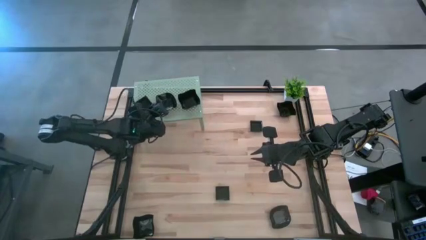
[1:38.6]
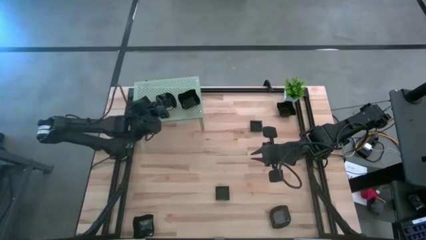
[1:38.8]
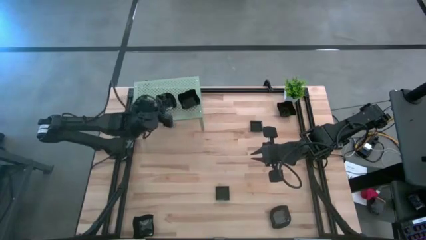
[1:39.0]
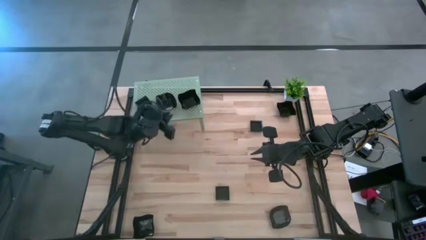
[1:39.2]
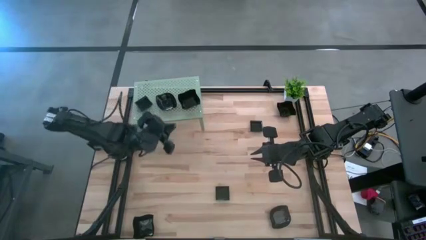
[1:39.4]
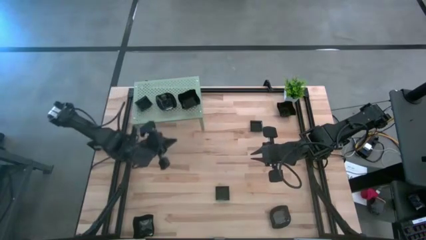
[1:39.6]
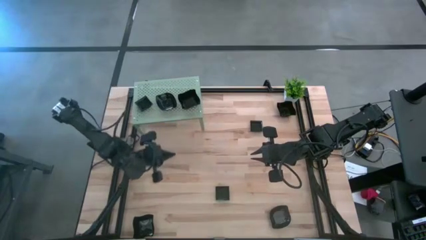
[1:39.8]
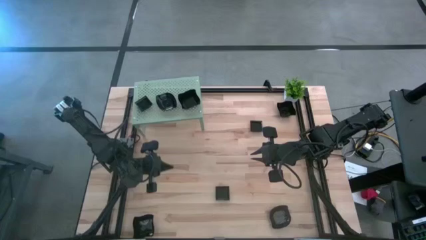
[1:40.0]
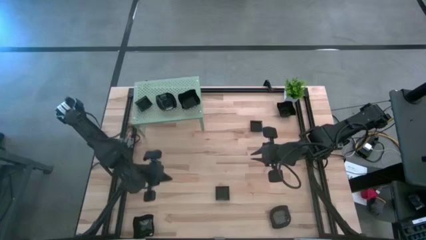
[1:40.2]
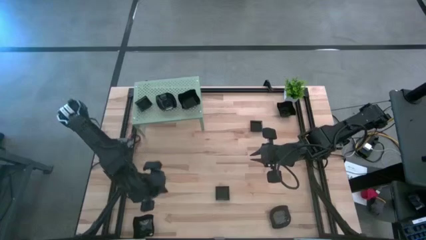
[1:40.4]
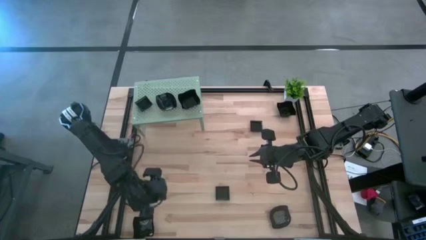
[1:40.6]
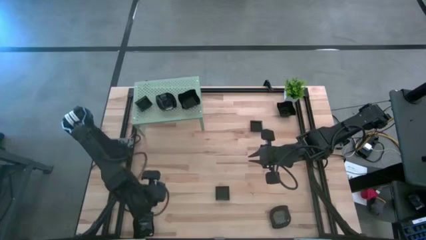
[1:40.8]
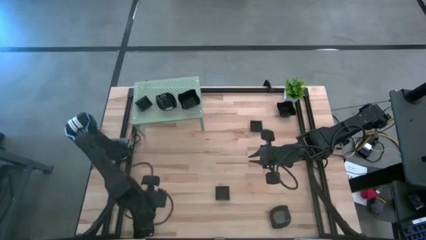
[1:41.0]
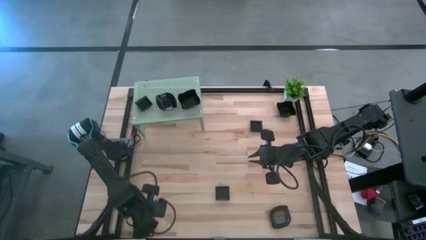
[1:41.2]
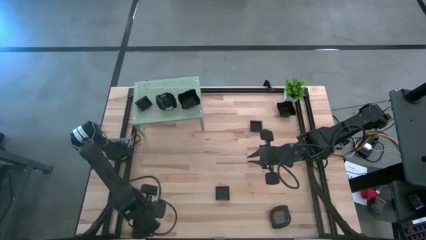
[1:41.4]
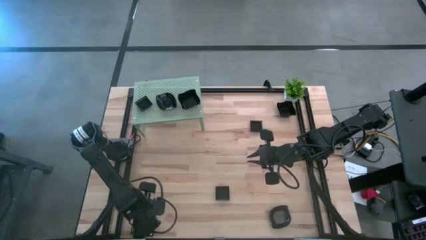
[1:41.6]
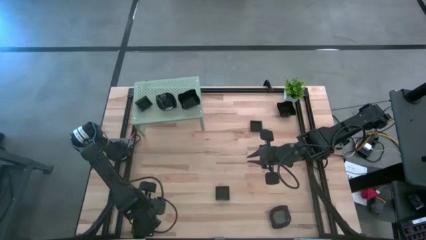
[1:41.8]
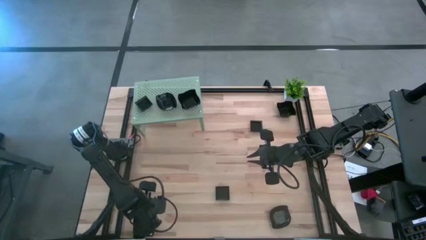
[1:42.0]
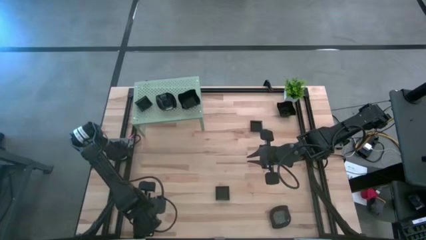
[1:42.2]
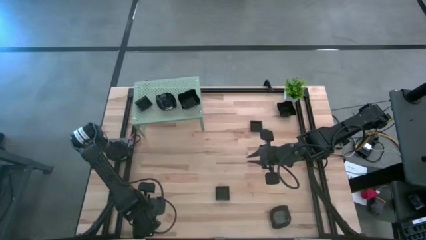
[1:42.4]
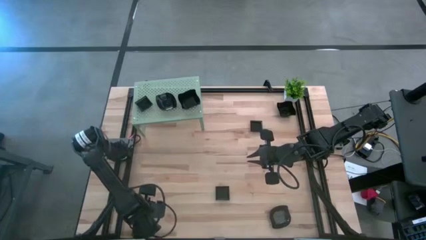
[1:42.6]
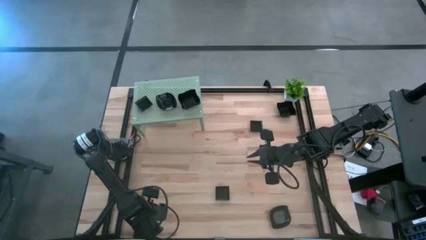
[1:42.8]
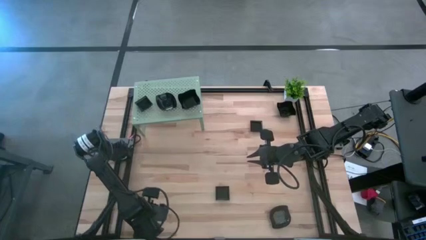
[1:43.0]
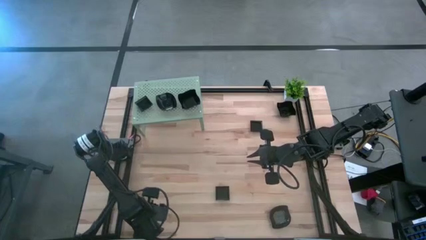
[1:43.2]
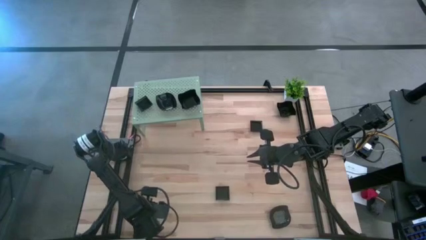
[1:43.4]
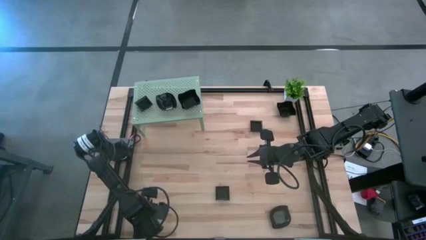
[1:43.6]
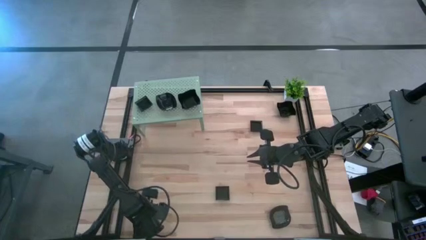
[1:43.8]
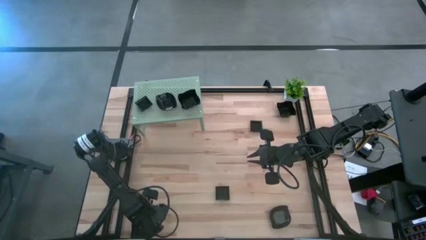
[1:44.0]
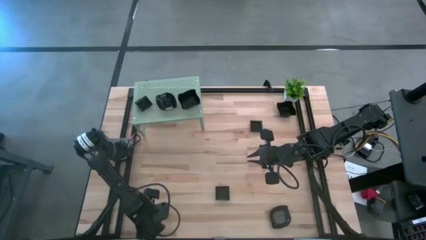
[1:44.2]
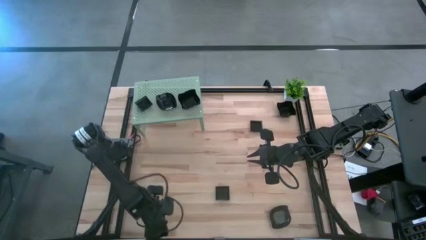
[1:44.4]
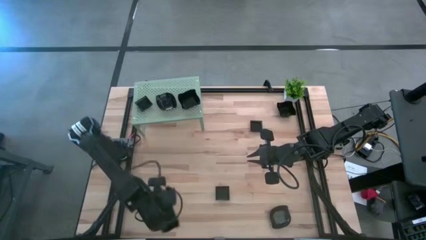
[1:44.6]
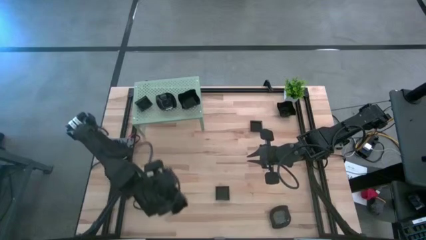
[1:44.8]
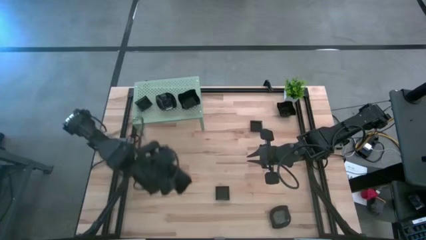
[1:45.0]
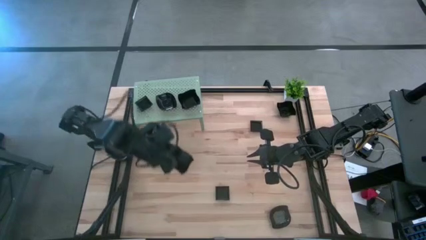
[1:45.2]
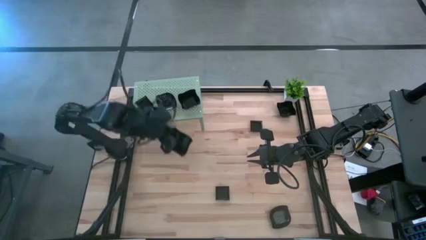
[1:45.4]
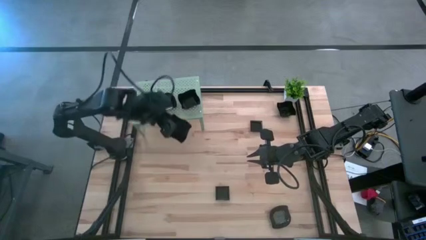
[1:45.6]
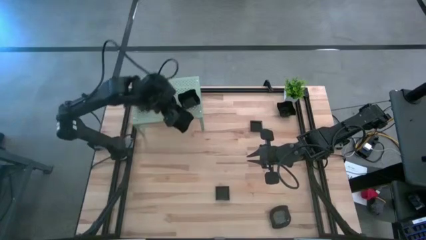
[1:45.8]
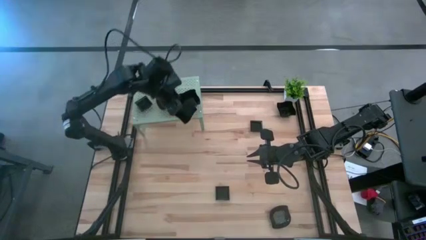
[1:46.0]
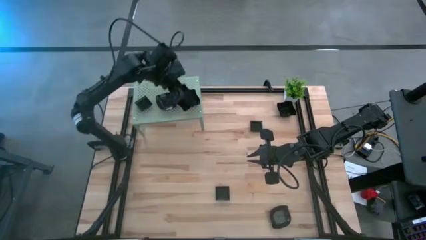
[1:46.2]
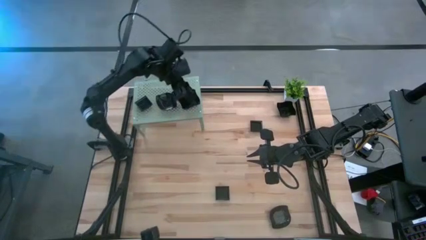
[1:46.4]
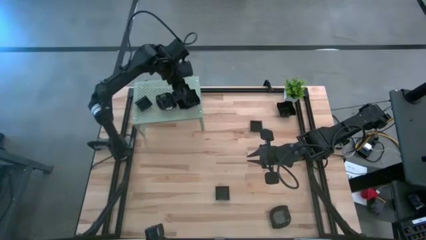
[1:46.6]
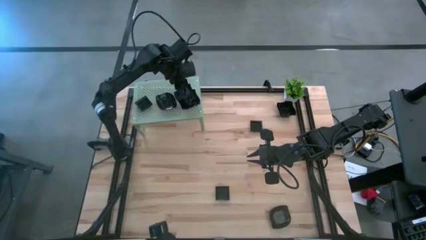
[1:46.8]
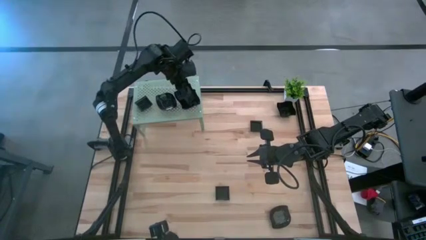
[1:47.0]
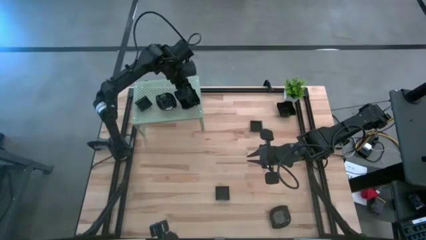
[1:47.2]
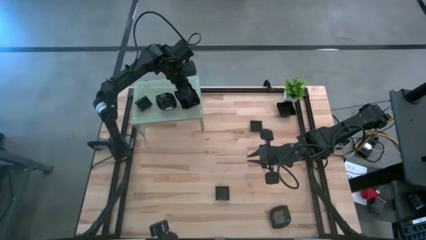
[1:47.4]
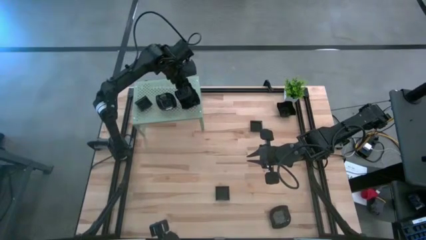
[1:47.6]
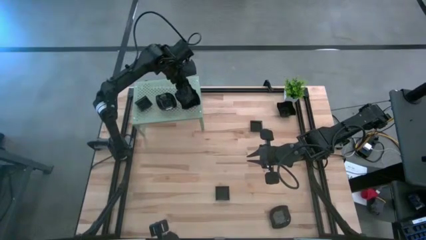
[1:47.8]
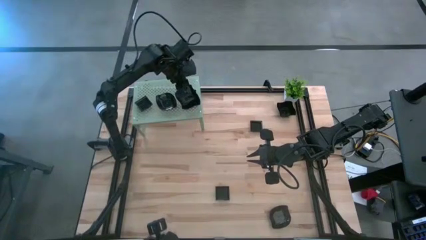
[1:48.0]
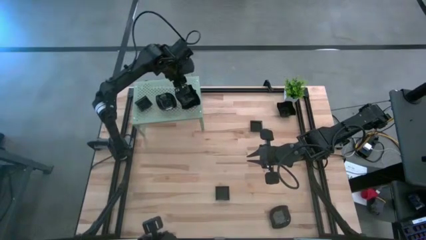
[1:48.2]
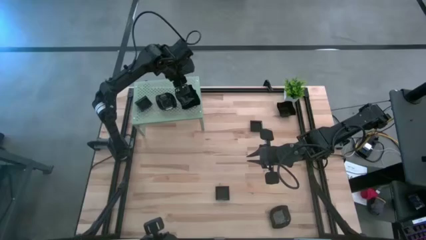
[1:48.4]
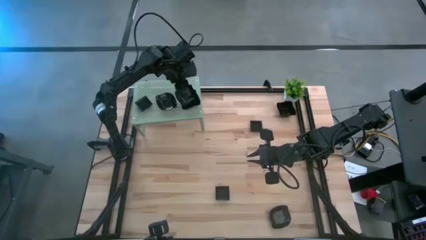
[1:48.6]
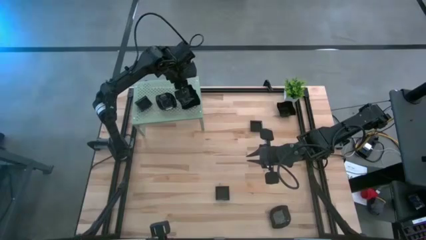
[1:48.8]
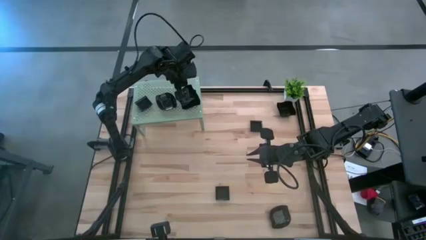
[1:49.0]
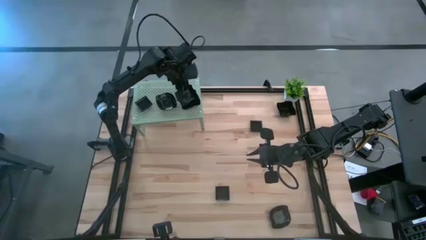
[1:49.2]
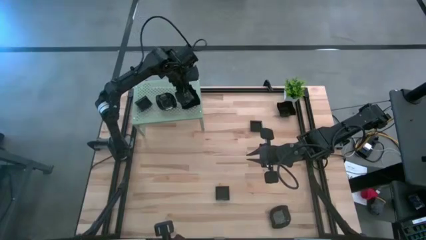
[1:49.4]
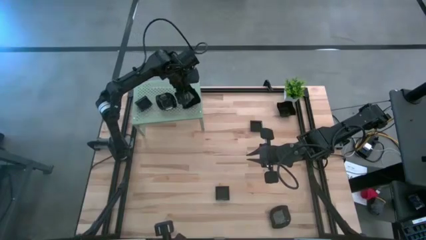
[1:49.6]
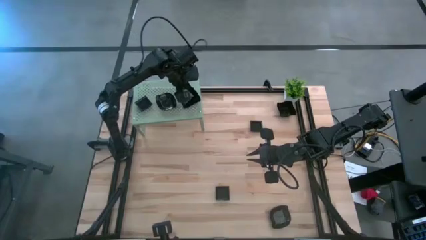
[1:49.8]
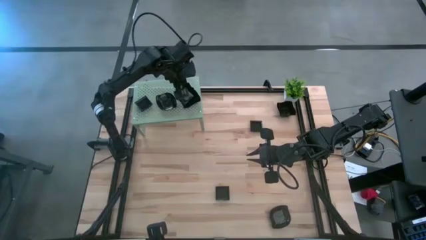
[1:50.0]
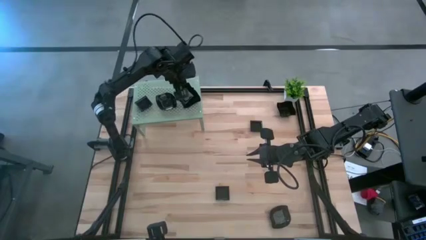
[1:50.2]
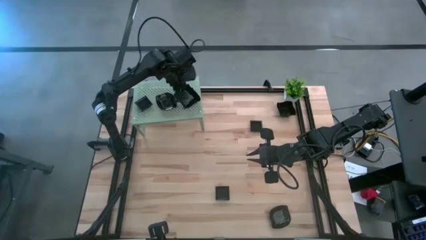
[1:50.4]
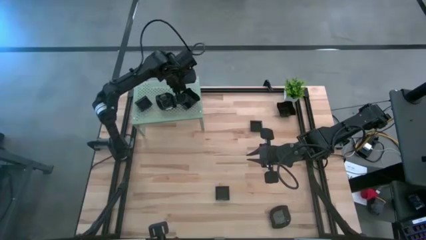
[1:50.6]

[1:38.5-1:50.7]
Task: Pick & Place Mini shaped plates
Stack the black wave square shaped plate on top of the wave square shaped plate on the shelf
